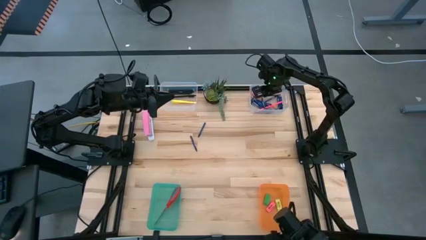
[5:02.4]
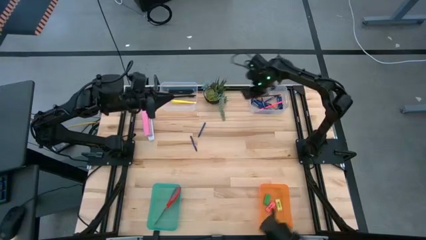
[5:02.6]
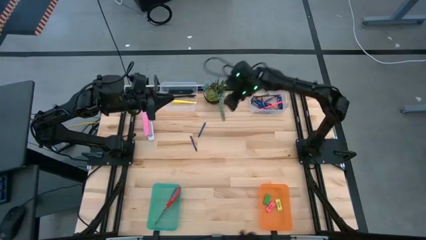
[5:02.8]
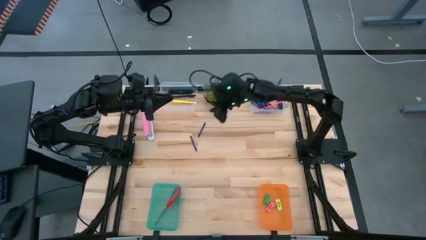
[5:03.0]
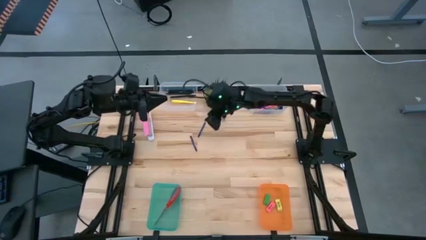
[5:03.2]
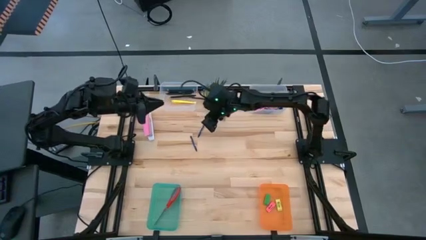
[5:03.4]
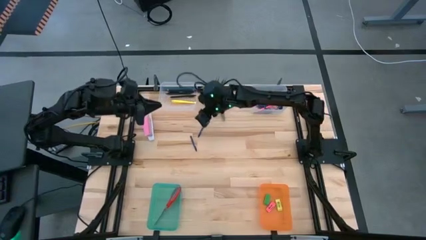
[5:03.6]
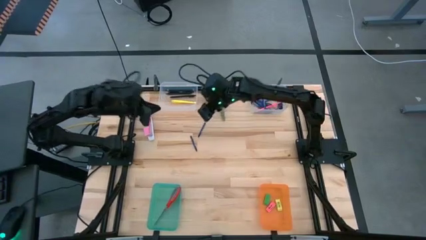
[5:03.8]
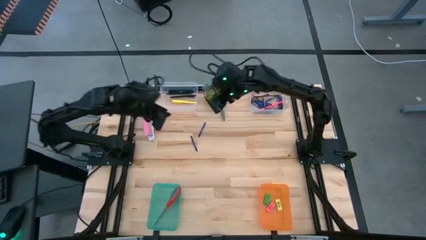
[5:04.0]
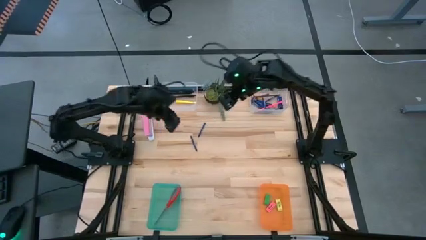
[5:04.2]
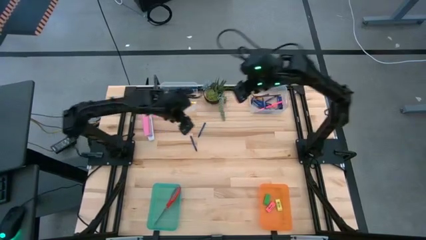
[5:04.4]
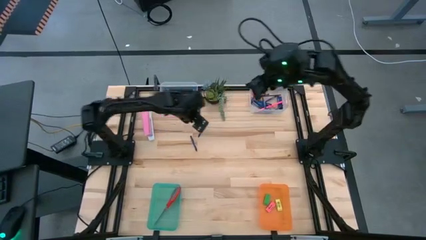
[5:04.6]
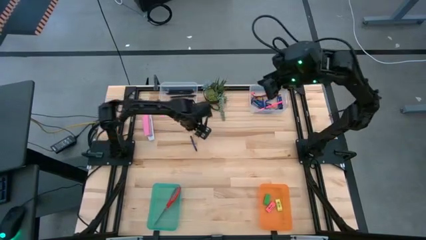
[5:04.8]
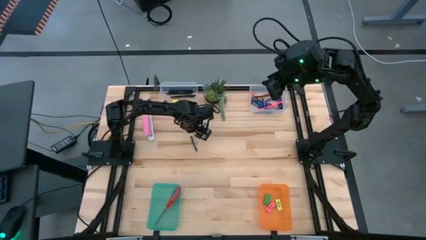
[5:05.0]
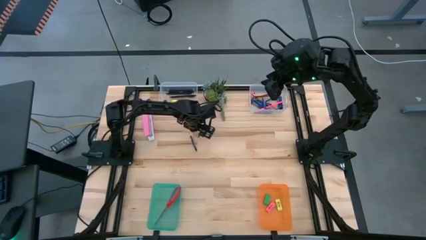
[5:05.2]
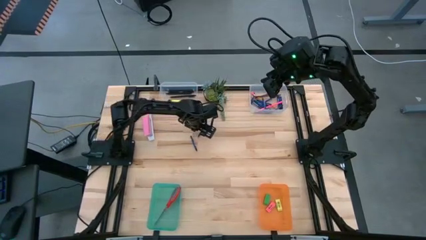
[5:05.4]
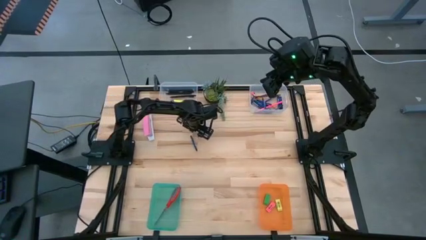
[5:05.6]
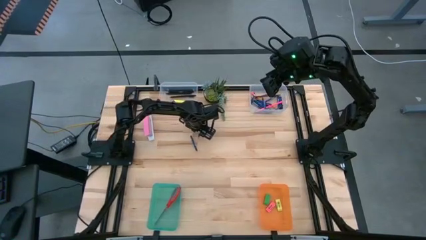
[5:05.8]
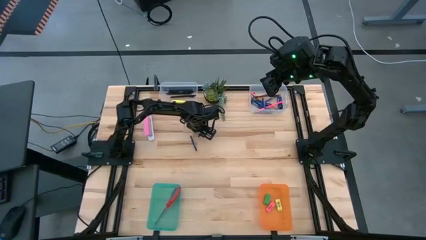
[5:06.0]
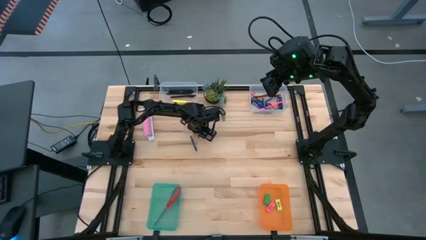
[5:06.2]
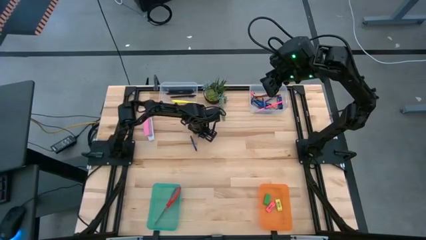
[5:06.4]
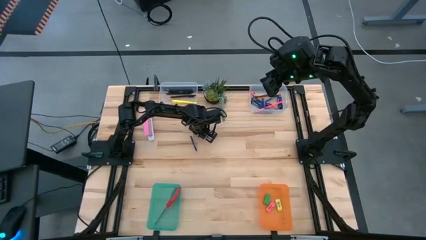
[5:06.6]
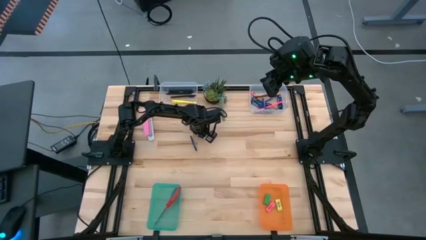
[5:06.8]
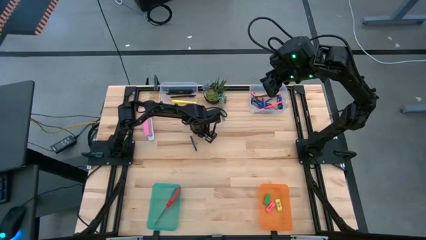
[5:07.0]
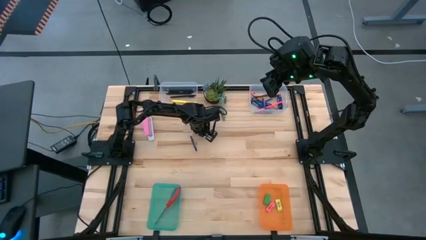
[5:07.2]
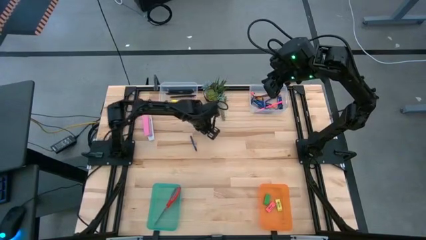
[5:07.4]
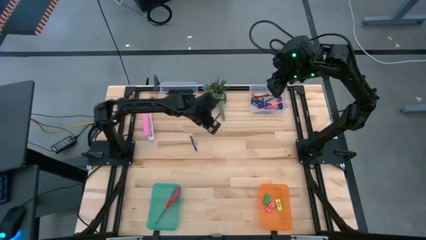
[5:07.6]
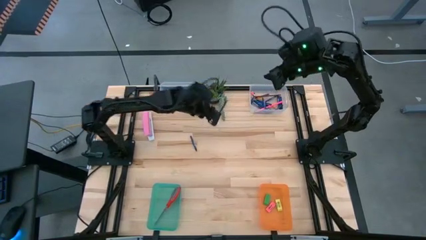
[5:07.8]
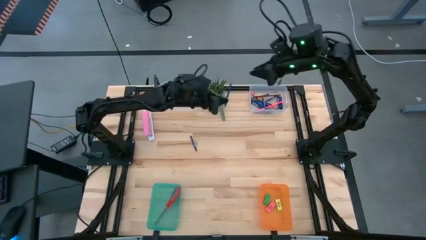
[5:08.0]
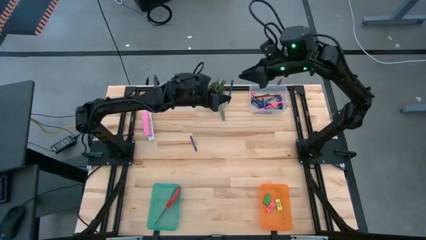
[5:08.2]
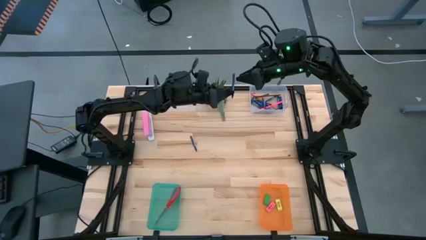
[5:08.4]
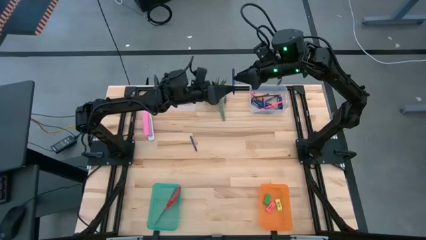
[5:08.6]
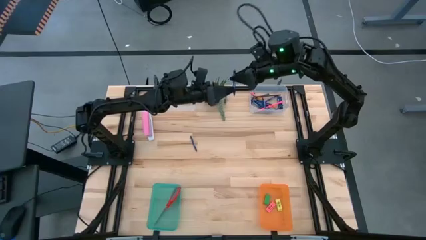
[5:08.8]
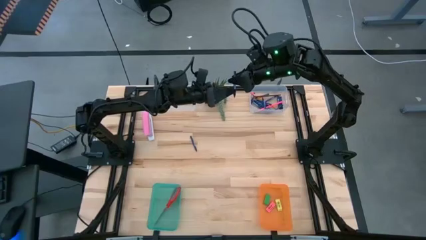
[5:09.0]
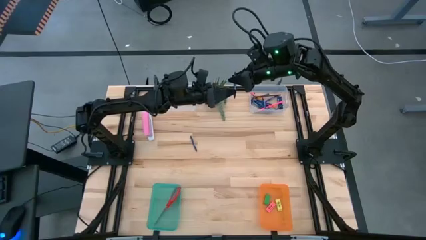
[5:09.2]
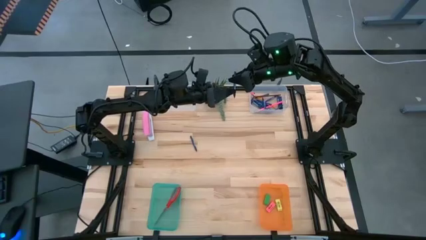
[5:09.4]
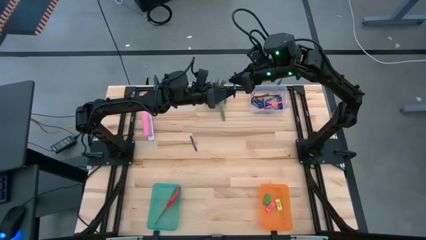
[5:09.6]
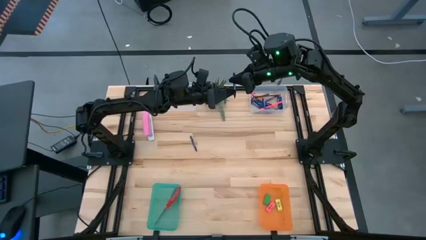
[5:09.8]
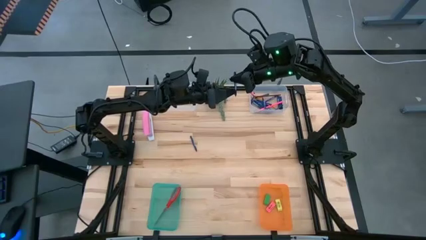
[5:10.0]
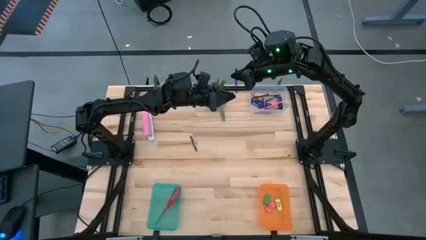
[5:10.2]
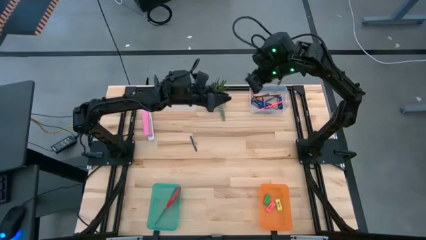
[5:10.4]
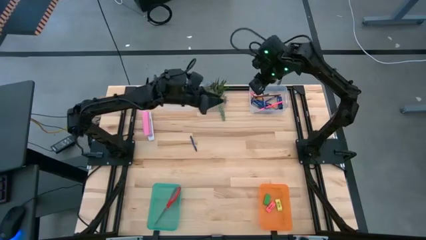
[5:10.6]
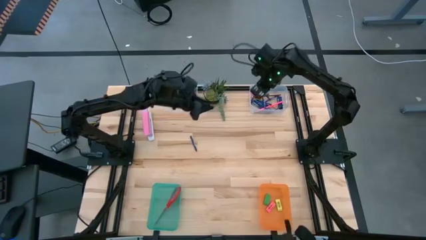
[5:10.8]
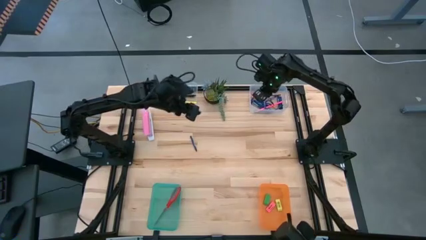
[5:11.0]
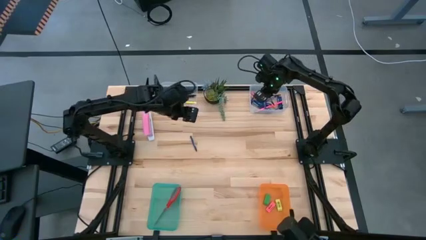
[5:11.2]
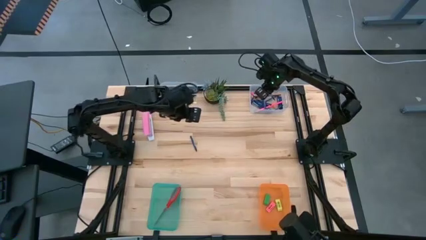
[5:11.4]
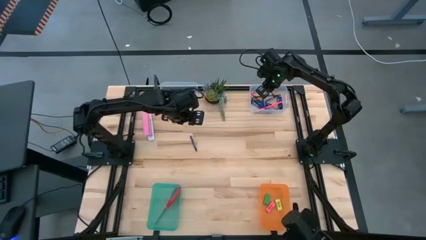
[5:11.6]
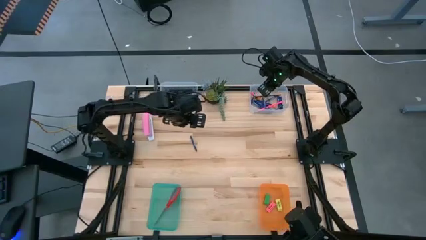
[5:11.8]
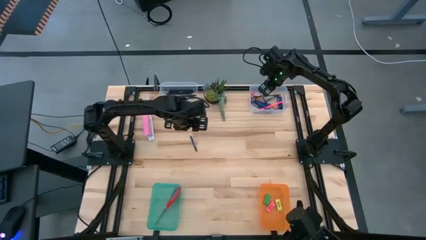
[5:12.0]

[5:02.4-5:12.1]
Task: Sort crayons/erasers/pens/pencils in bins
Put the blue crayon into the right transparent bin

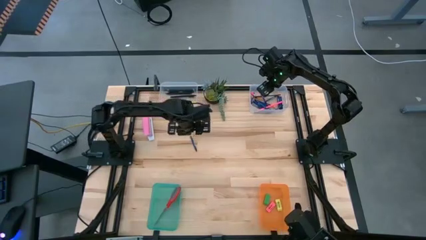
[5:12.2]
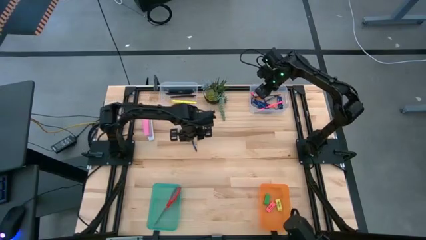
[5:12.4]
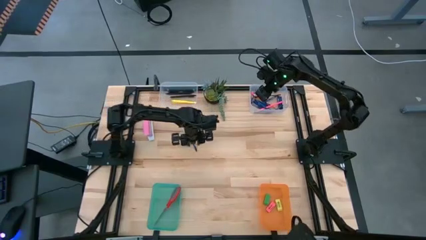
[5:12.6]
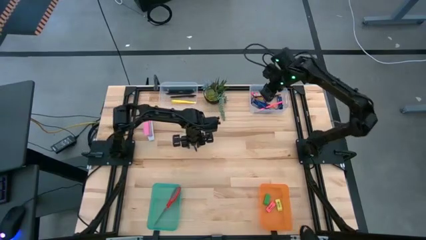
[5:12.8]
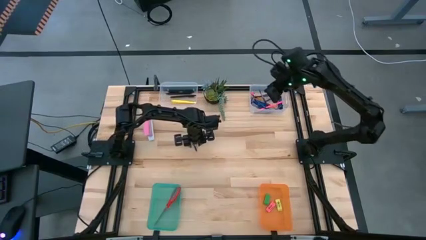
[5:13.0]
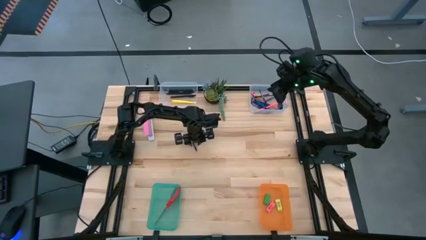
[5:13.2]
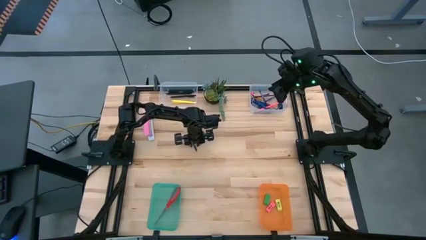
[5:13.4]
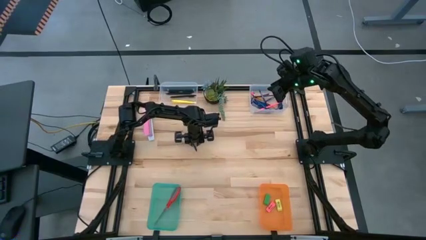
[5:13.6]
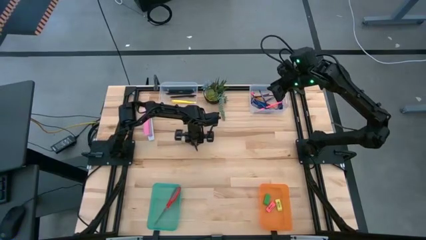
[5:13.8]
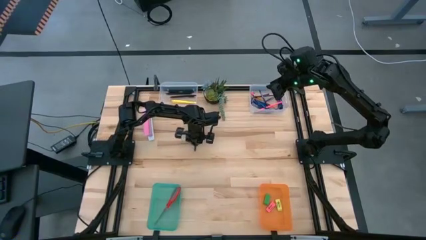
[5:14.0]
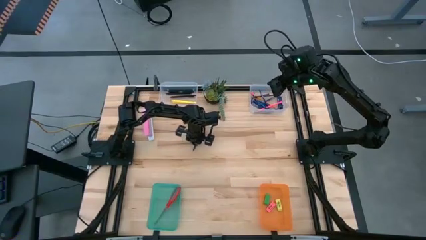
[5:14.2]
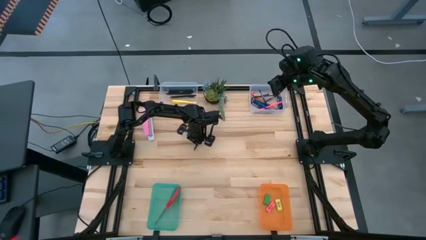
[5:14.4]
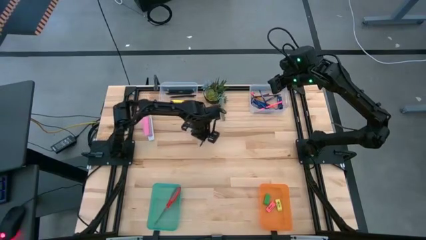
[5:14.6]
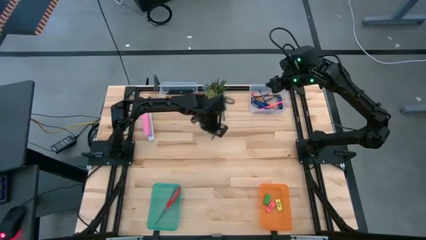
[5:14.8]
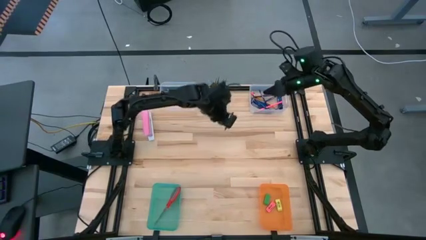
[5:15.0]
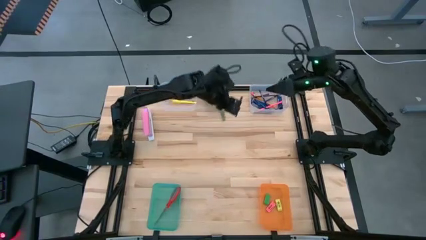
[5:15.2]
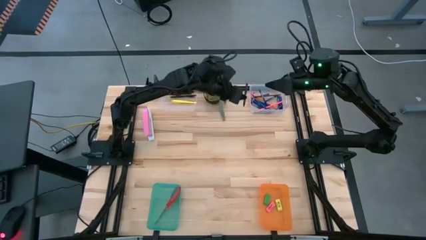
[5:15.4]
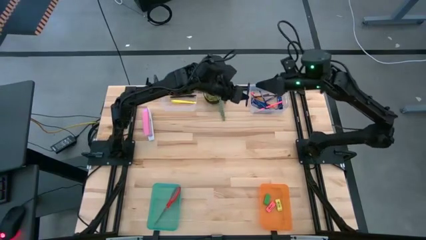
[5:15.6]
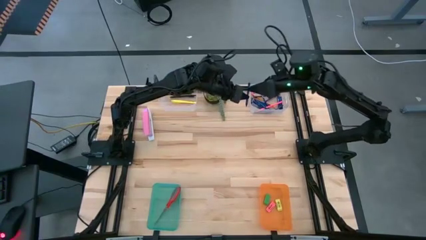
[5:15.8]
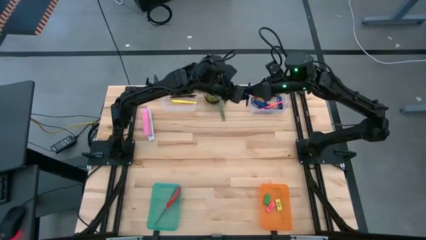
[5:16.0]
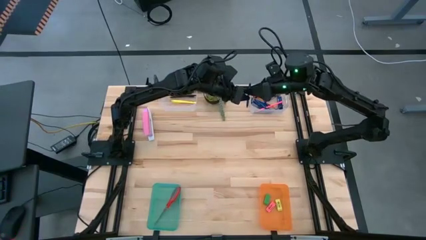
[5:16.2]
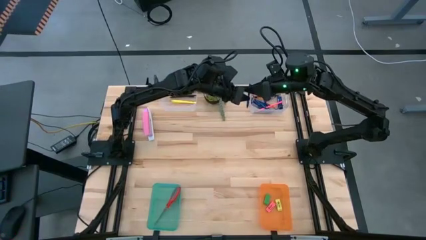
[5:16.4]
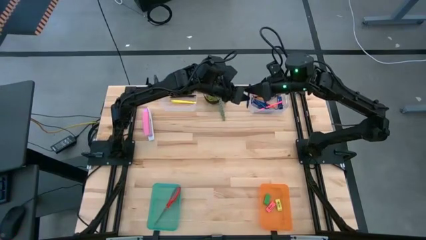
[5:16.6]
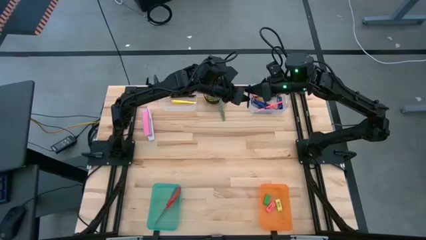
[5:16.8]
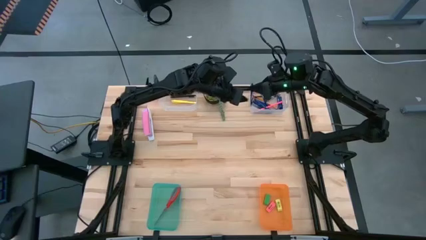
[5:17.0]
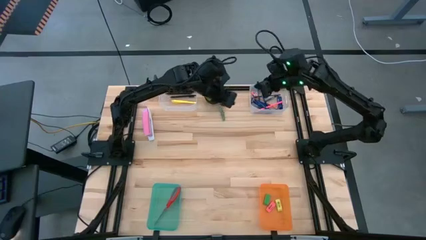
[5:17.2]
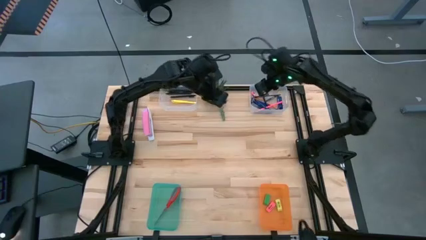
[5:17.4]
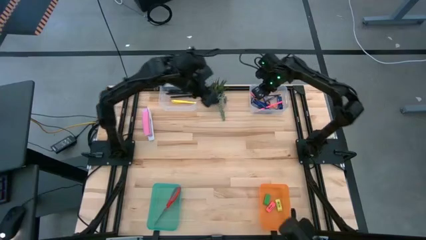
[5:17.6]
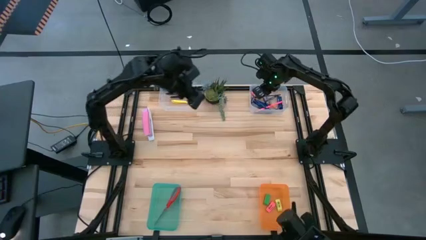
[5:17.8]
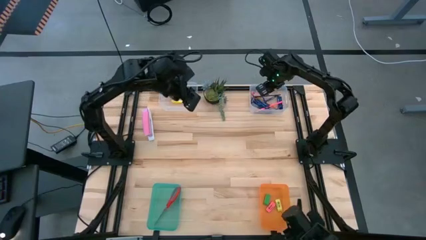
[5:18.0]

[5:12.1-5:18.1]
Put the blue crayon into the right transparent bin
